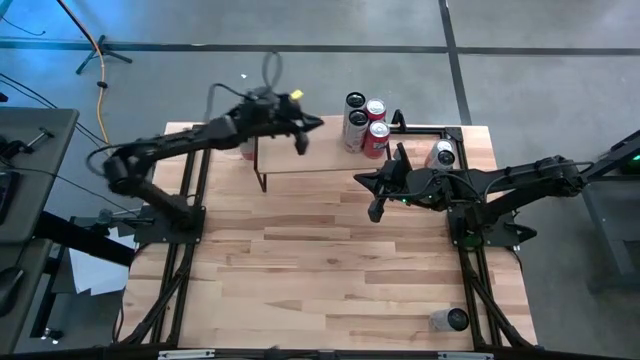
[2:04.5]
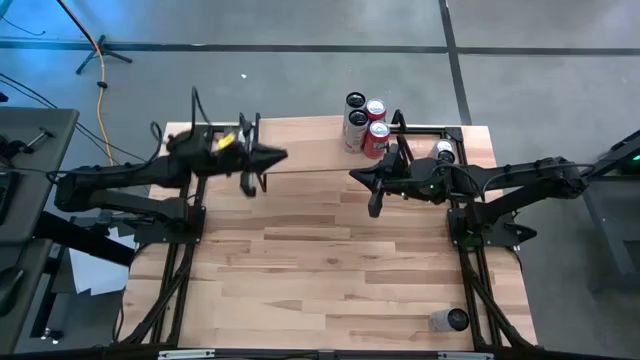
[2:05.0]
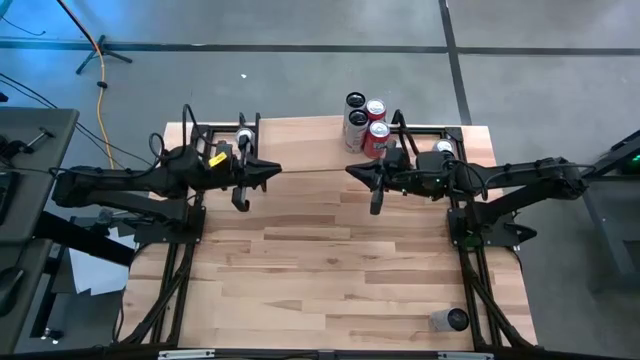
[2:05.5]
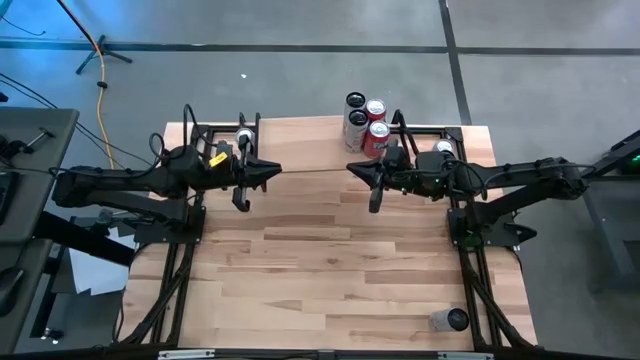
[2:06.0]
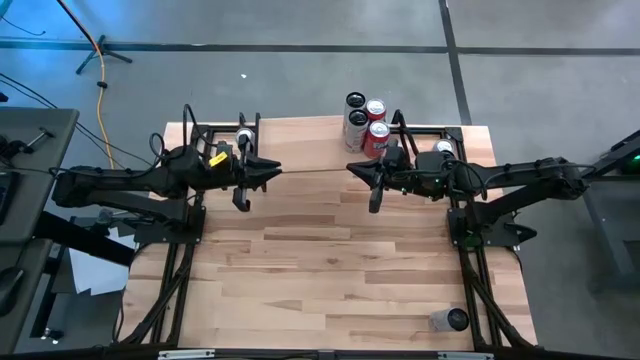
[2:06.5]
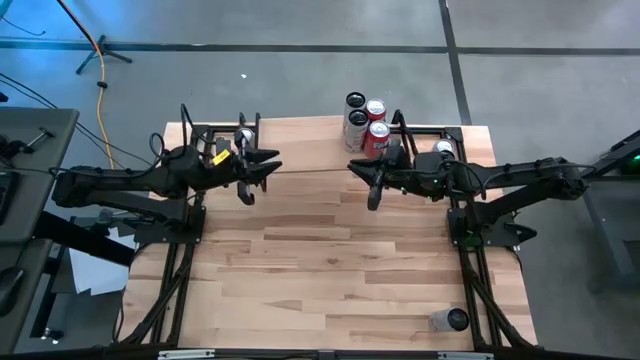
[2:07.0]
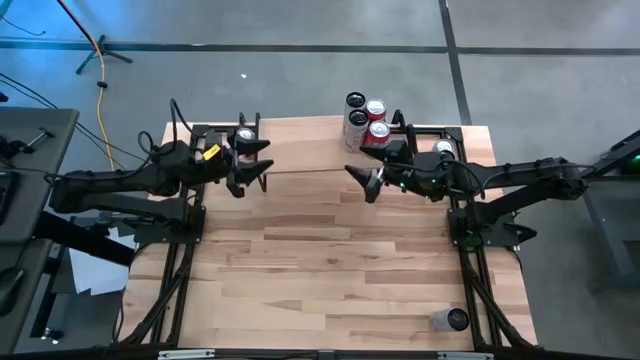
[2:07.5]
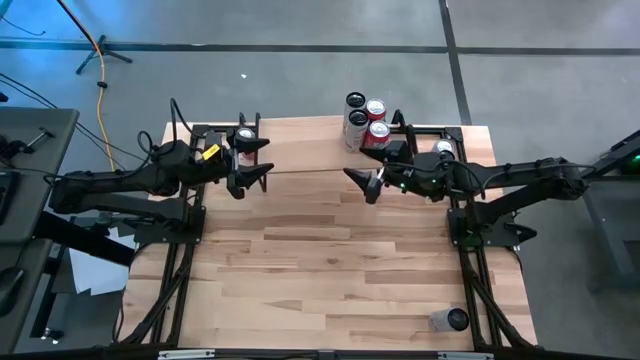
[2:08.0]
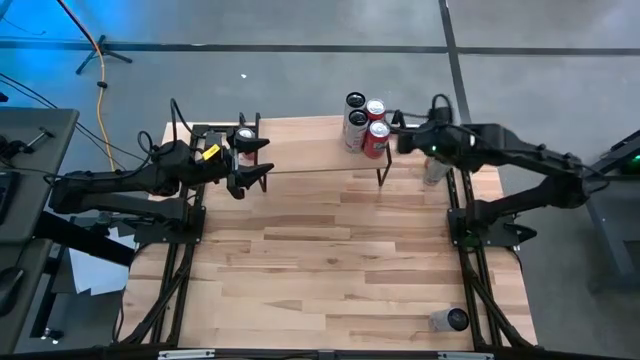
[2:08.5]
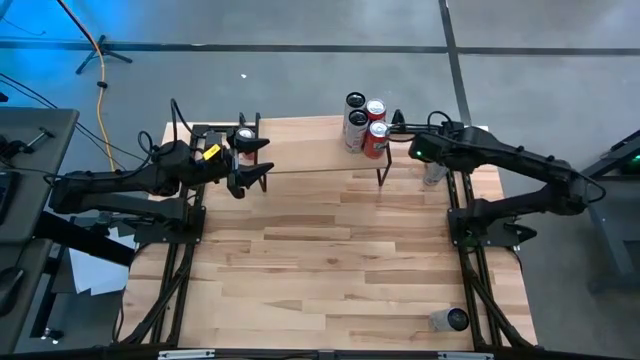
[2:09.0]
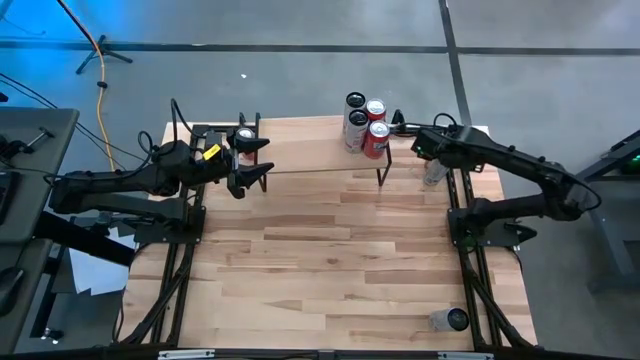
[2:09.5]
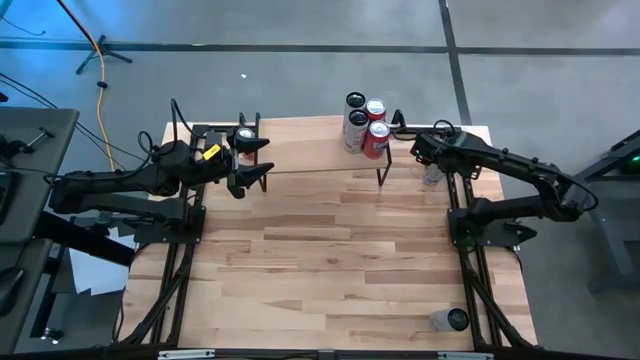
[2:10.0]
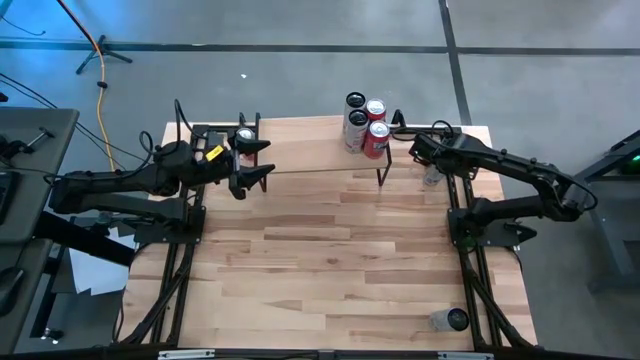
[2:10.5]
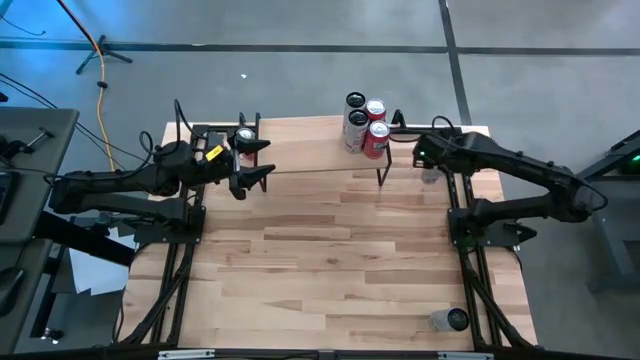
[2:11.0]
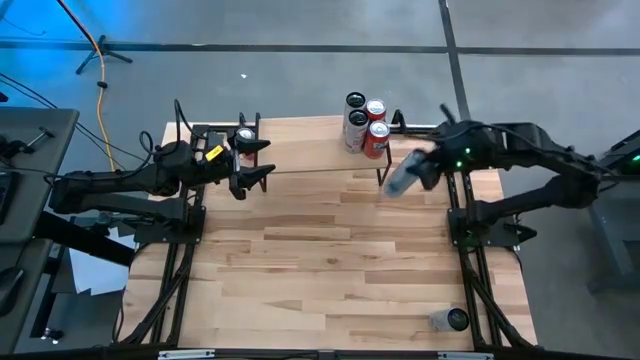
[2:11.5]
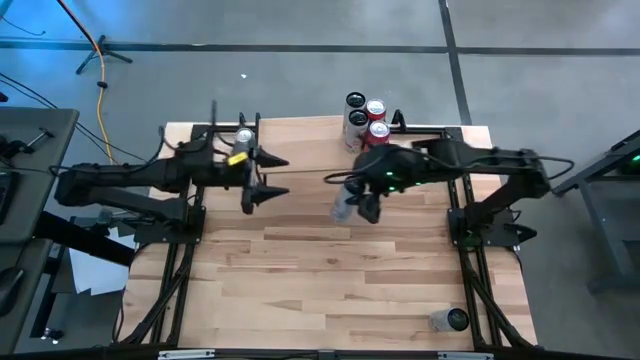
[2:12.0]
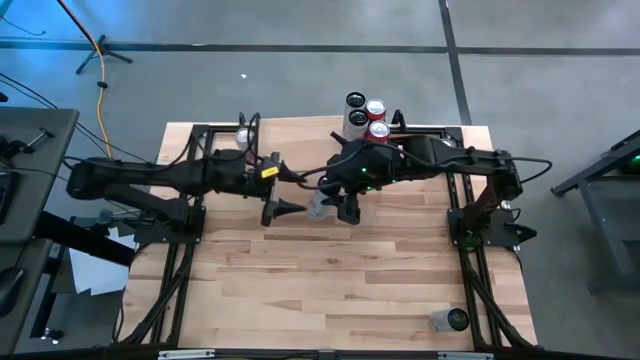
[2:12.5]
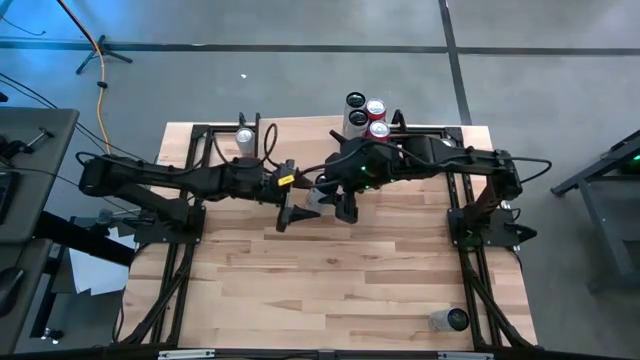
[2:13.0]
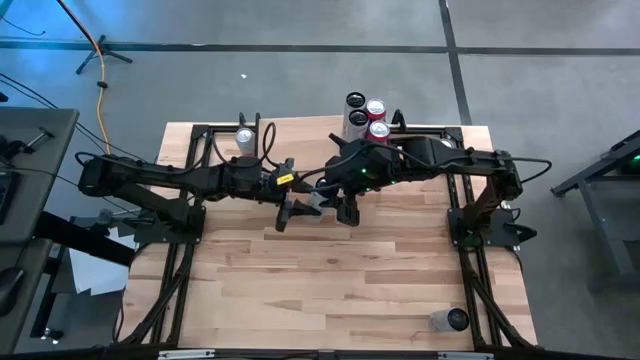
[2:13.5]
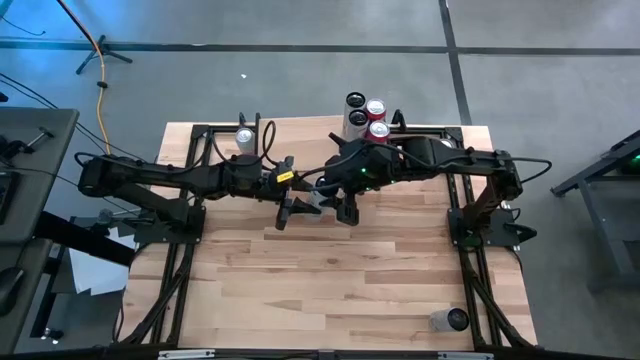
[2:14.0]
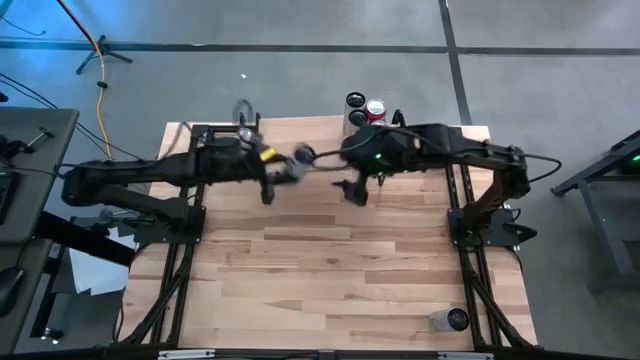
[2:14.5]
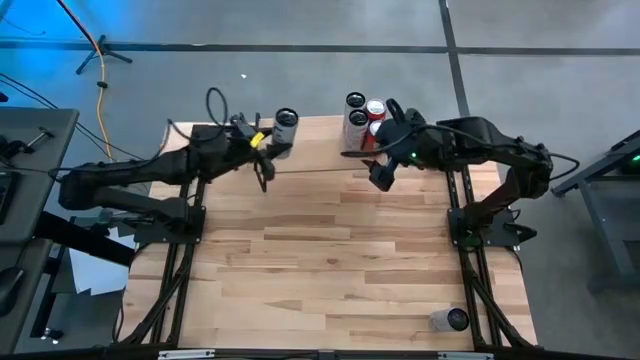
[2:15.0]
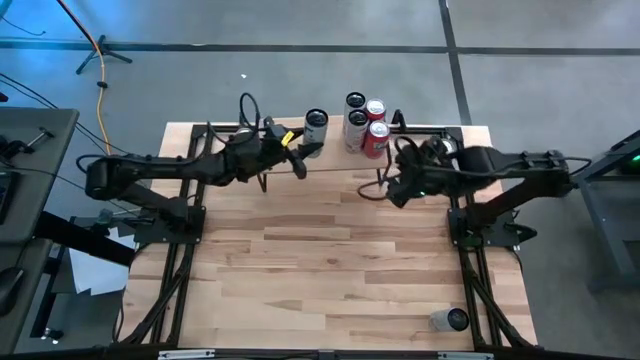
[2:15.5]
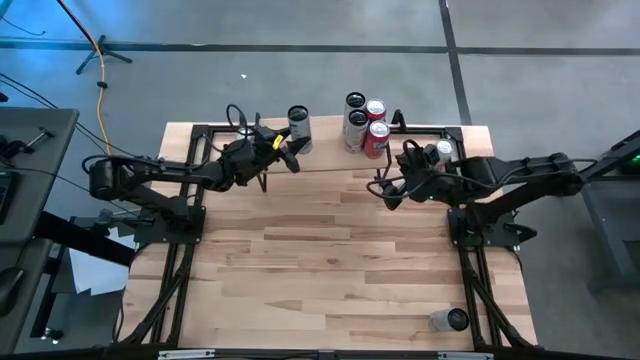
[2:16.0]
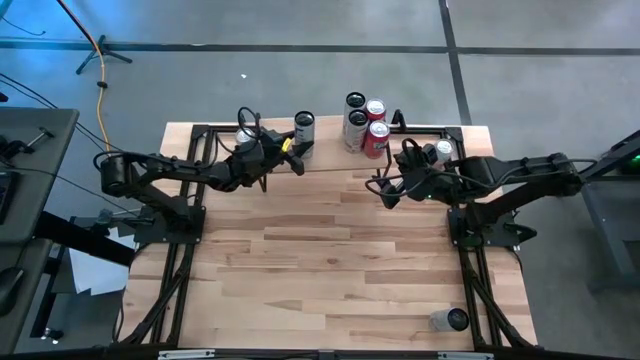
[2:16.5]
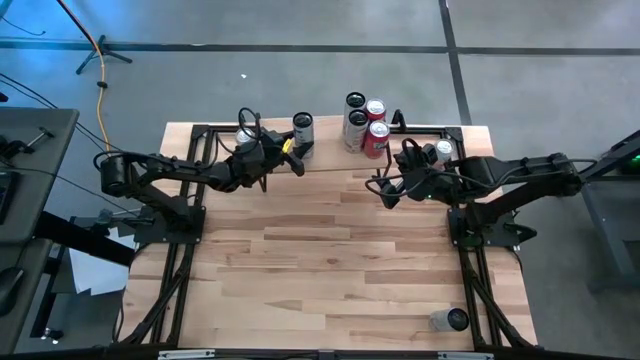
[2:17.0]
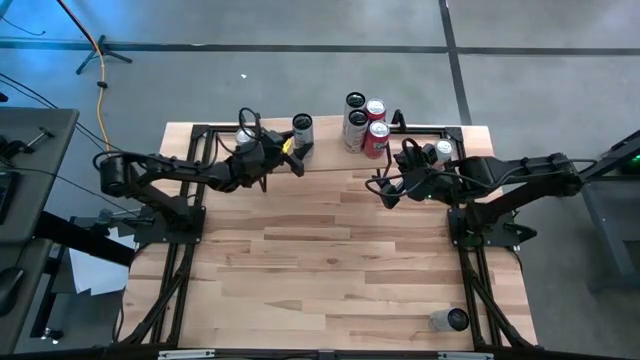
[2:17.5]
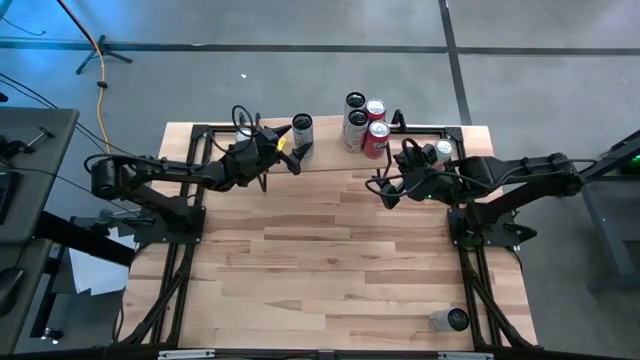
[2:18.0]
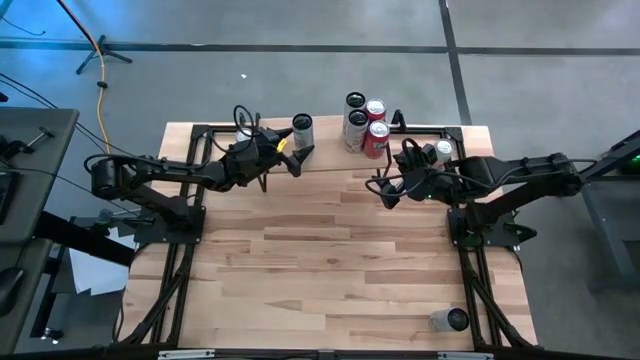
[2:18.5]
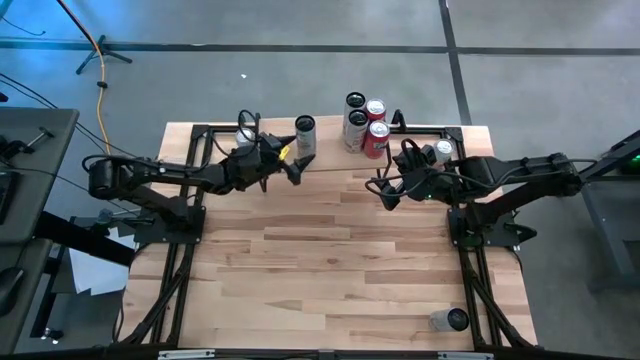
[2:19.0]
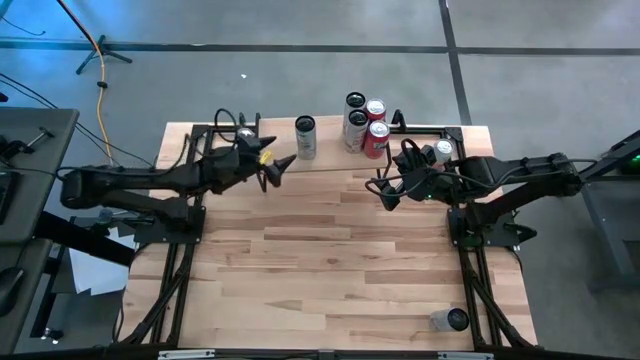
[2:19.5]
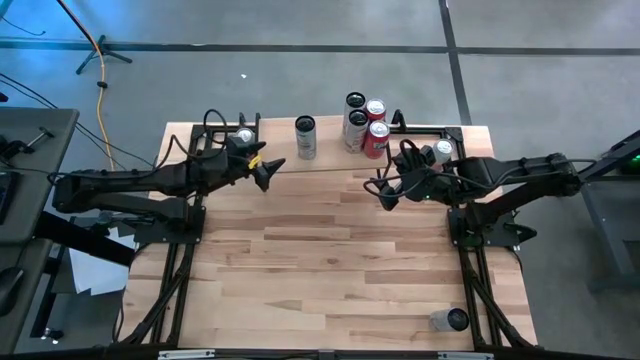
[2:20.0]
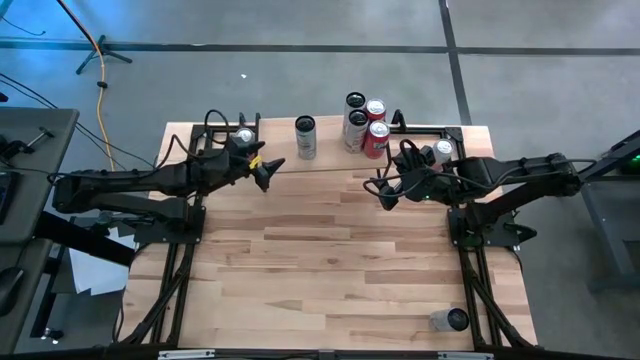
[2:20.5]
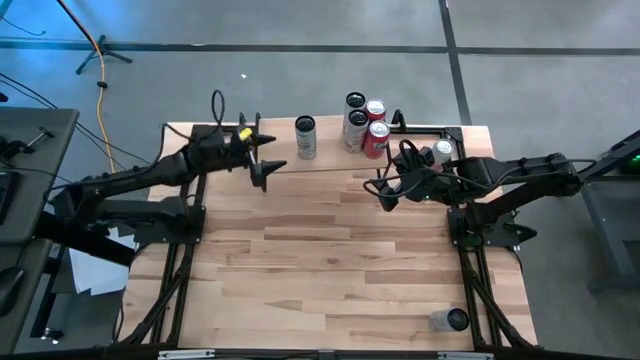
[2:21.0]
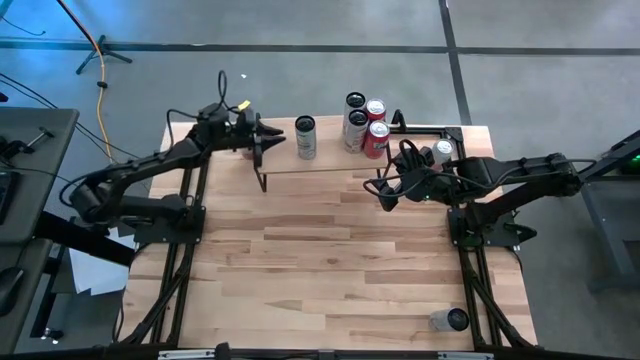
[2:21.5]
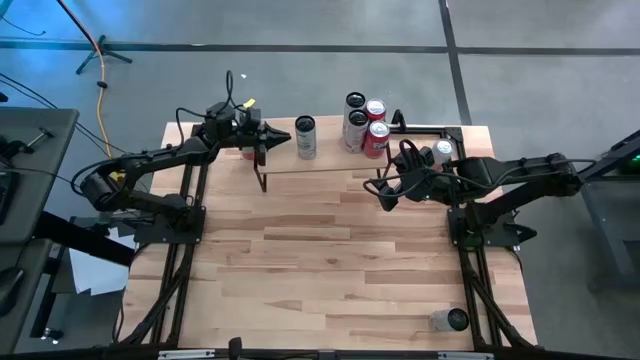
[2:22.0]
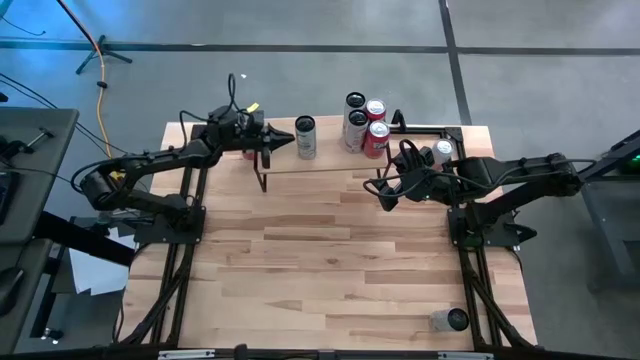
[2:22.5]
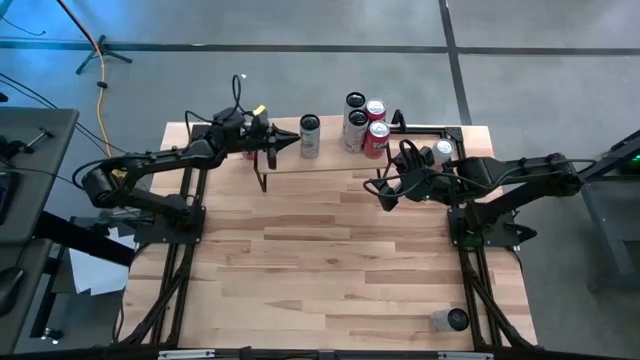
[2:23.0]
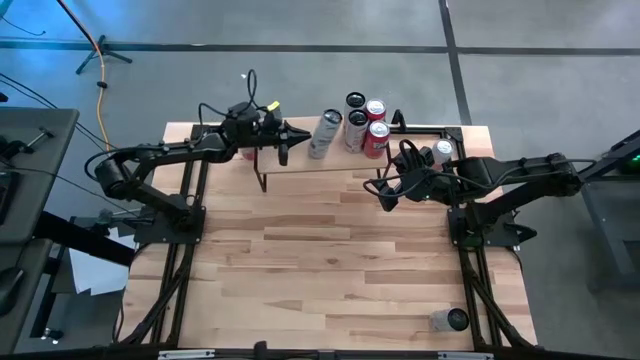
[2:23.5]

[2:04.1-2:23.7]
Task: Place canned beverage on shelf
Put the top black blue soda can on the shelf

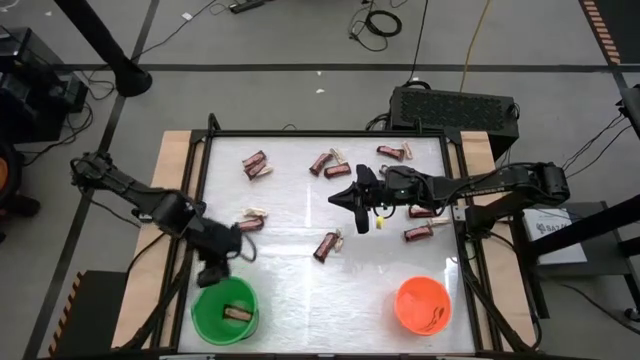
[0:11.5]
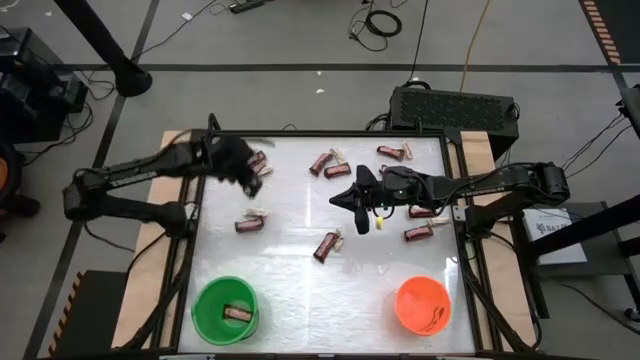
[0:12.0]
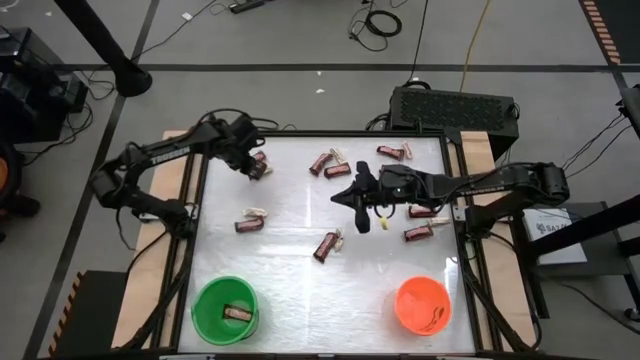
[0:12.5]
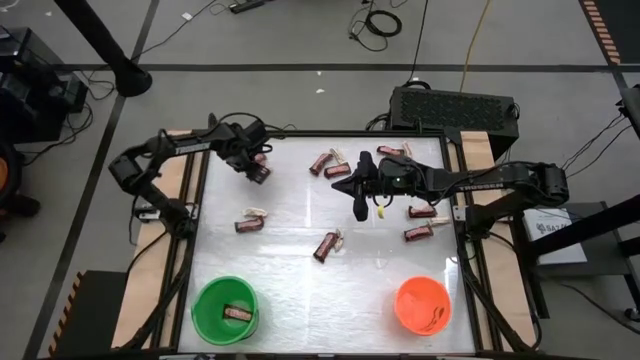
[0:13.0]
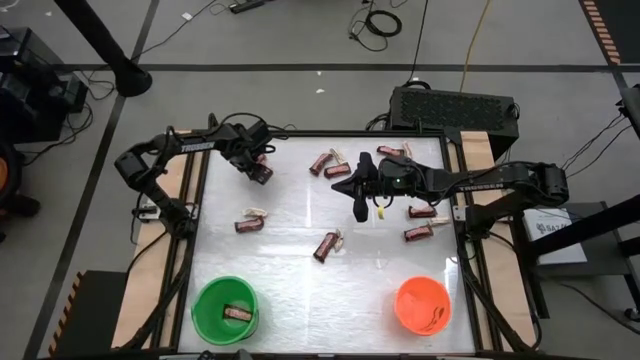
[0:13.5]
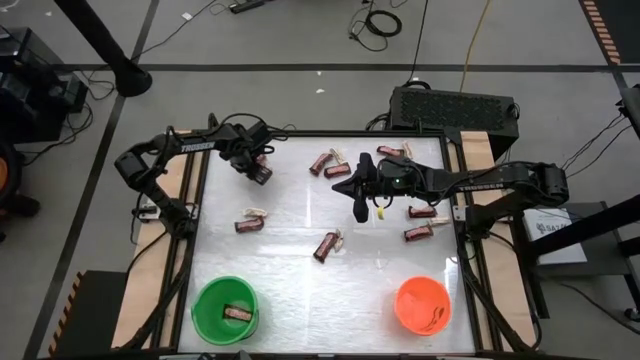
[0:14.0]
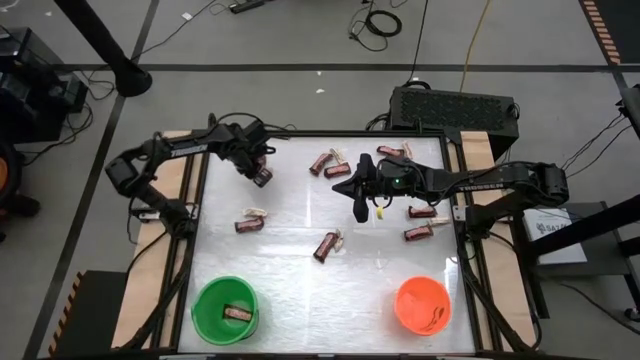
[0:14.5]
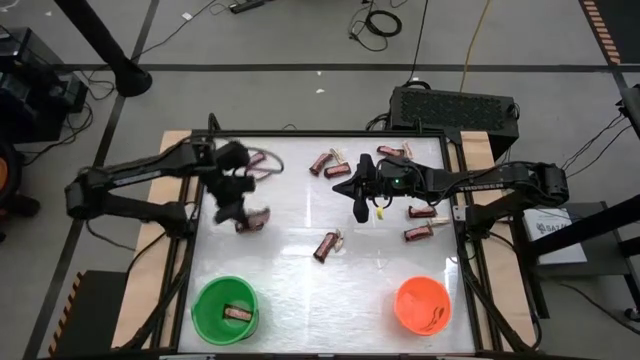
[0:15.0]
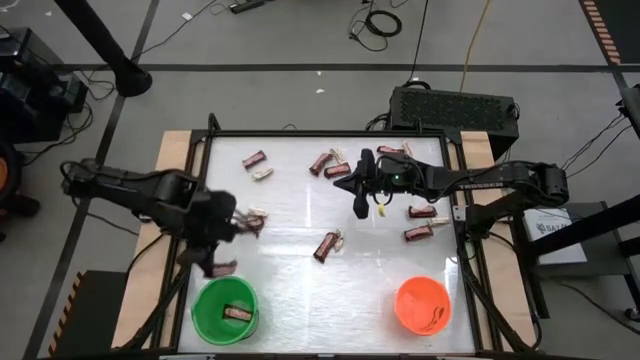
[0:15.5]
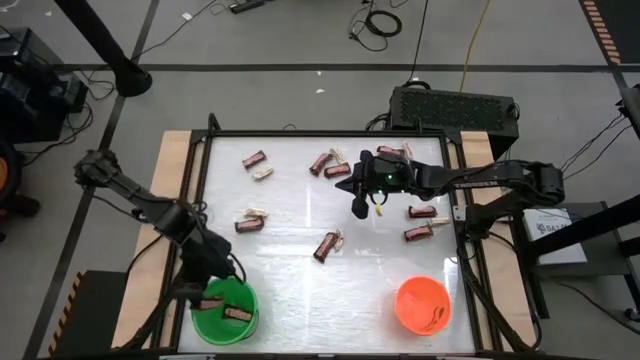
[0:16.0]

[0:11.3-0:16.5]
Task: Sort candy by brand, put in halloween buckets
Put the brown chocolate bar into the green bucket
